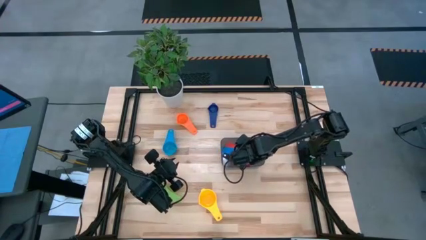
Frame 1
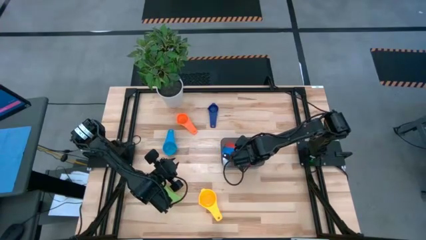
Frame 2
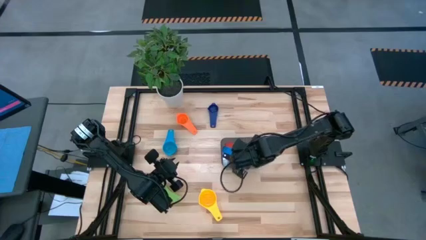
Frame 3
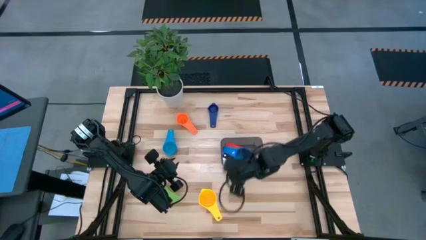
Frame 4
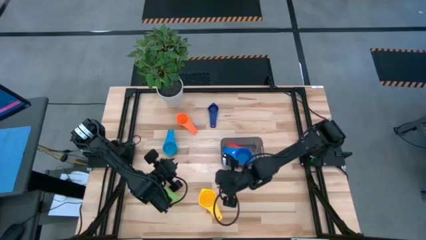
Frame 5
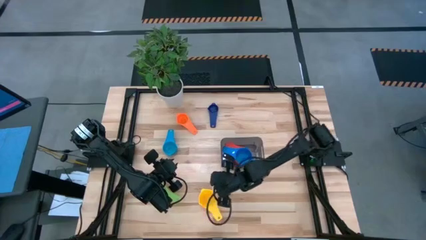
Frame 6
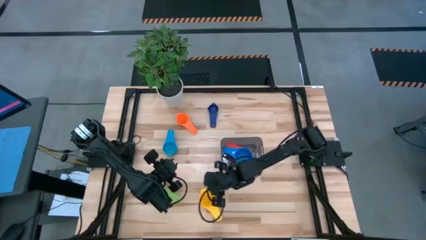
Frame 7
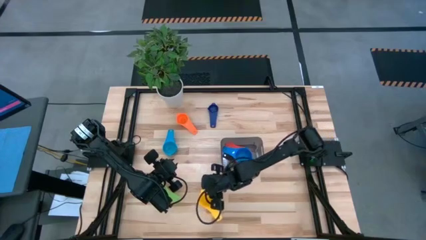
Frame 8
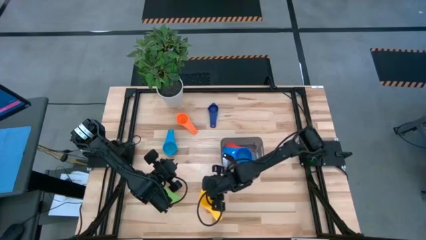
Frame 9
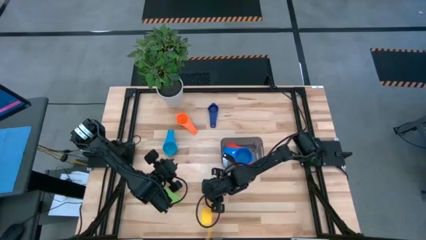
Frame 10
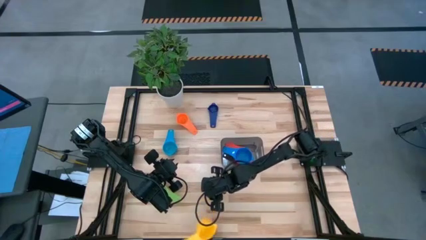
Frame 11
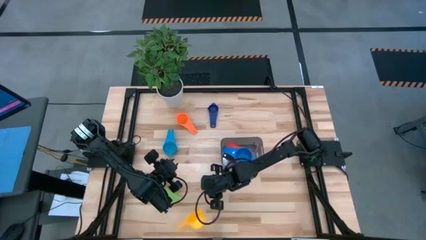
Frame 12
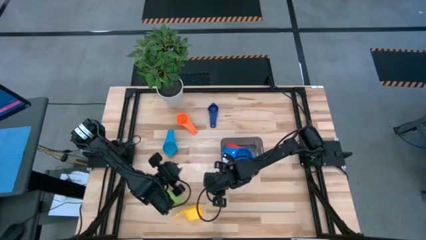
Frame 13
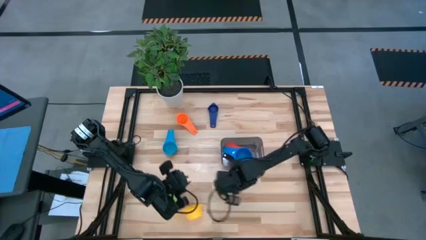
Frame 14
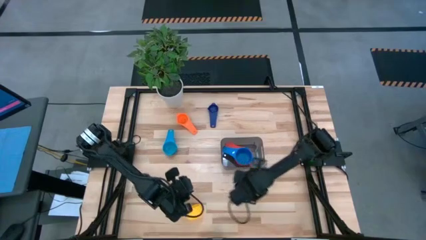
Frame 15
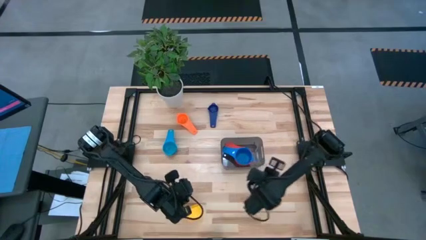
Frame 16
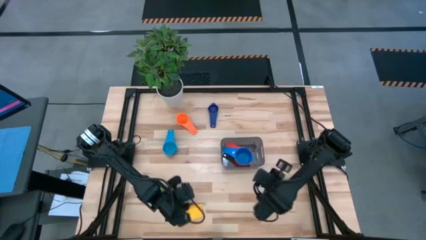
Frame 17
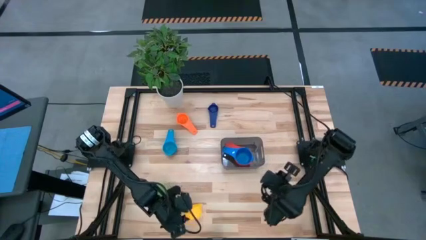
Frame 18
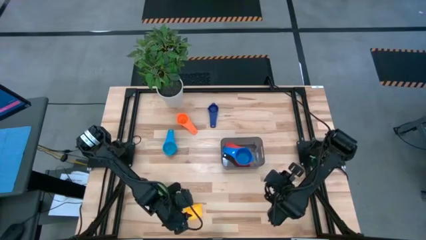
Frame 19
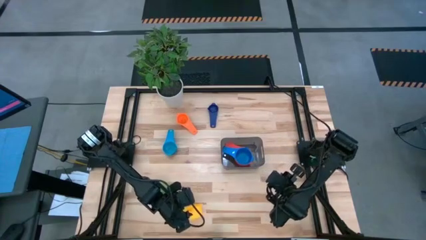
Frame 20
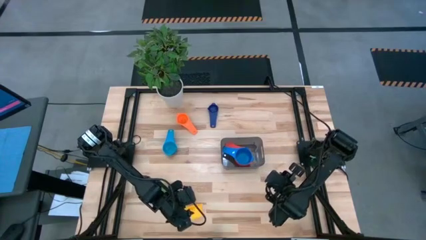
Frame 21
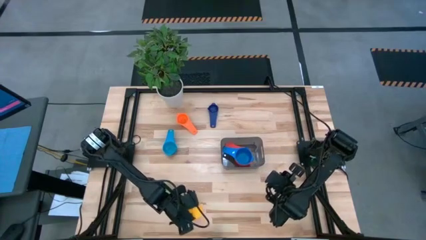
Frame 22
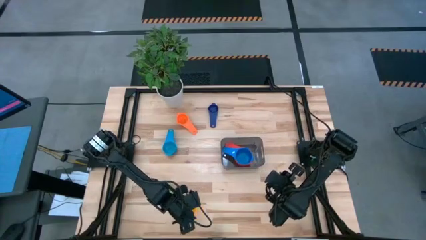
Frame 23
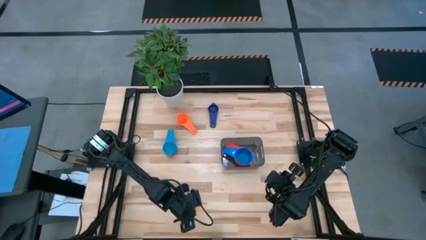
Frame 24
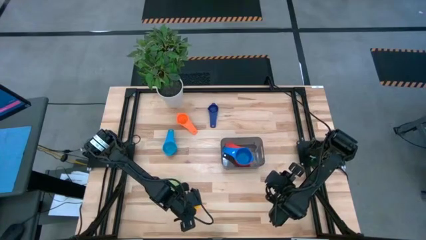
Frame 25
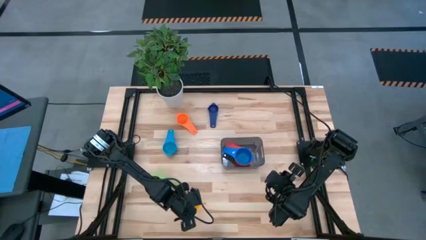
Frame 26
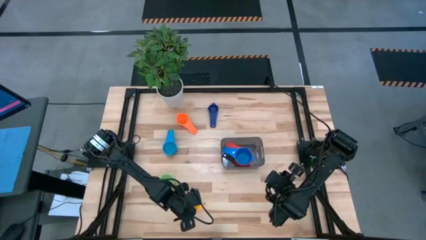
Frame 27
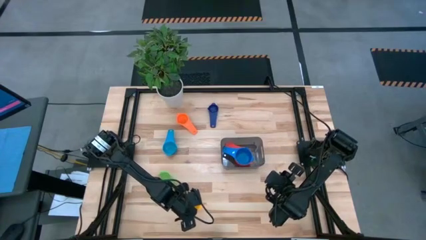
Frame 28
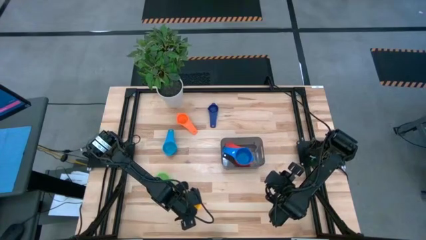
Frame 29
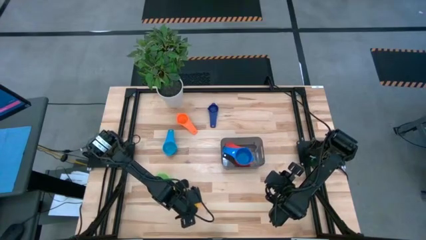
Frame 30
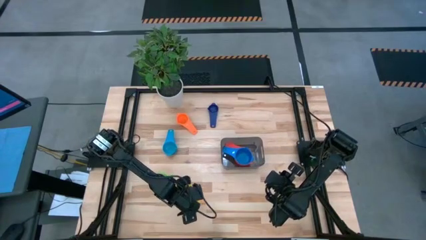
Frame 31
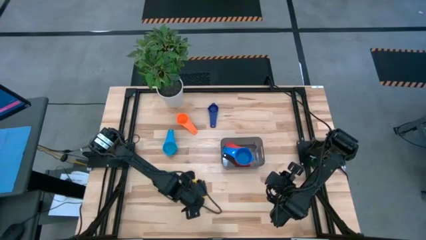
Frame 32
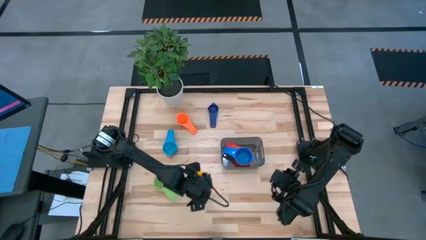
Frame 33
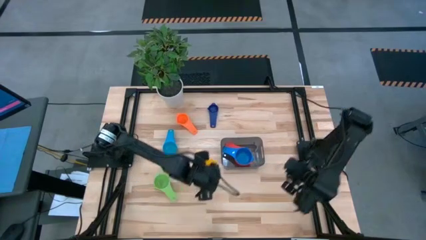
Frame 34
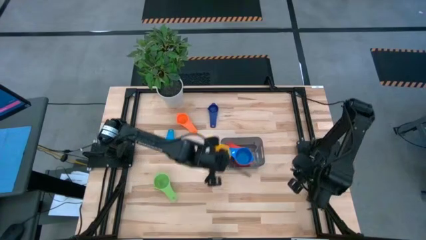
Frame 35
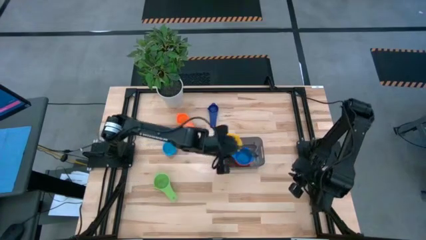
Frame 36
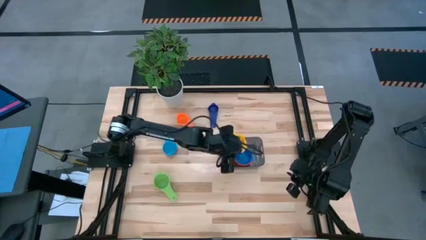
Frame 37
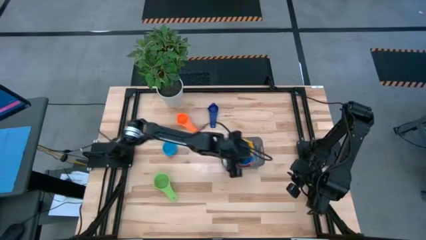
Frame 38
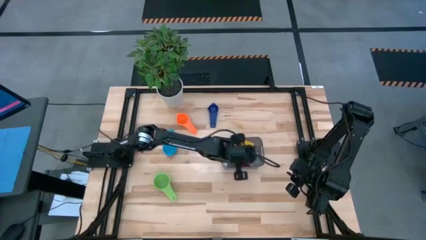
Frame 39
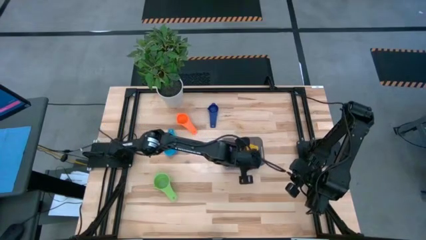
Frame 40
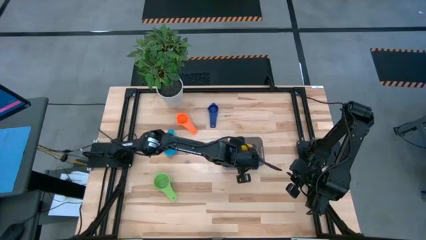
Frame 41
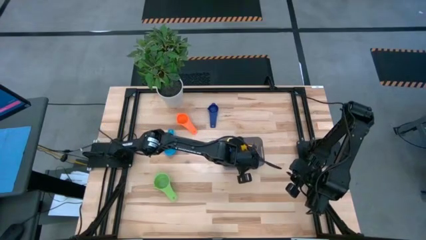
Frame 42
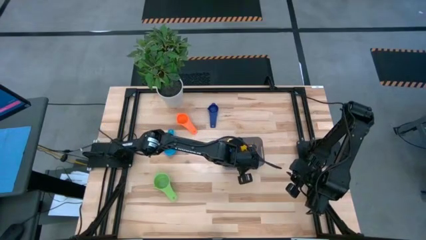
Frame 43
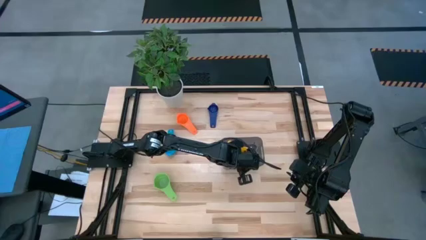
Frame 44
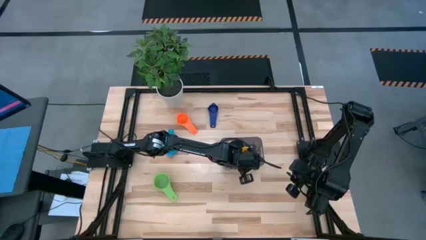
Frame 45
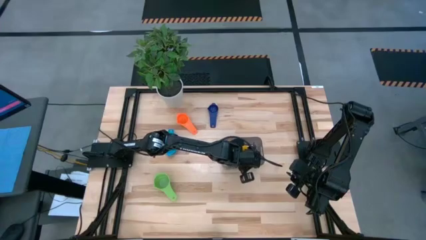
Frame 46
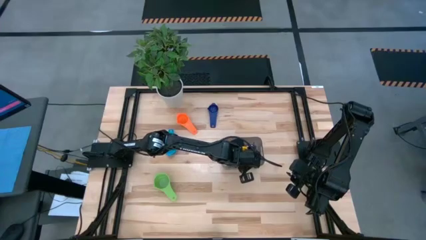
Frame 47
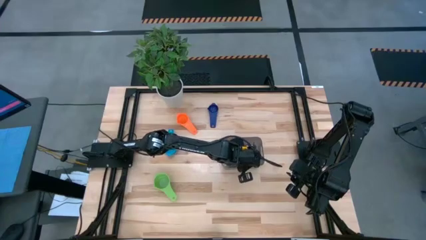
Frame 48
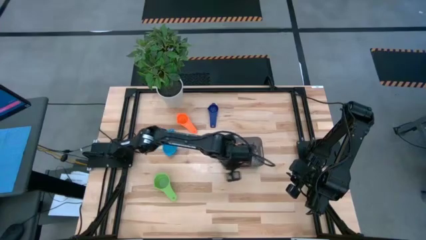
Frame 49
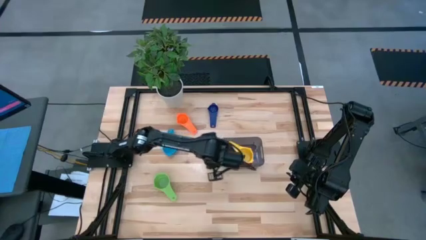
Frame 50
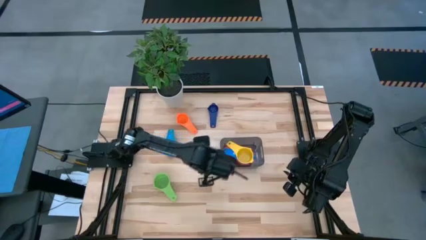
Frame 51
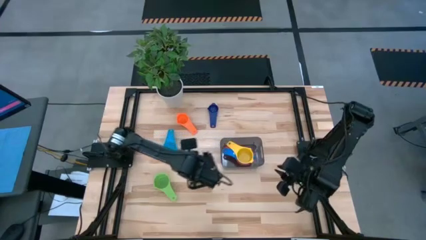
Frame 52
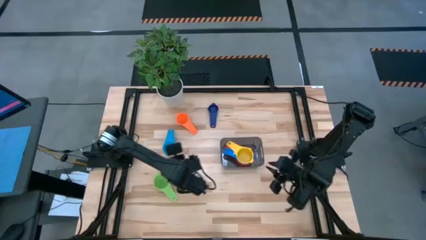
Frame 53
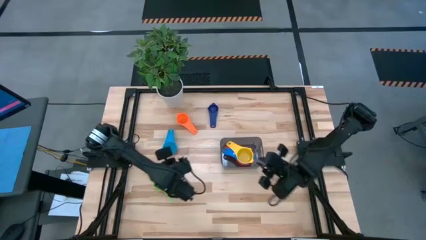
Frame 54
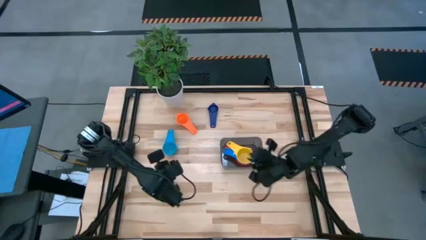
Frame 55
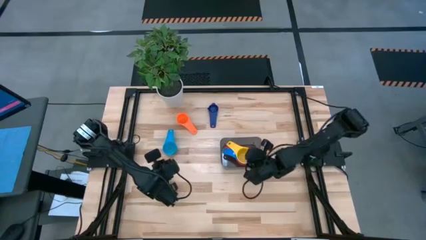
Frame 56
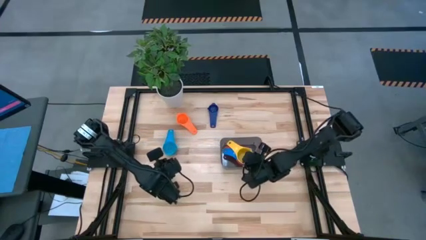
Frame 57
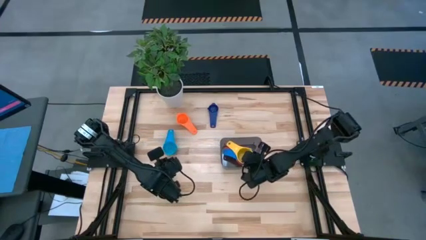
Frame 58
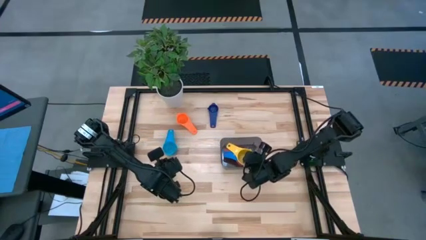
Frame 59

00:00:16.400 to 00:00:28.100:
Task: Nest measuring cups in basket
Stack the yellow measuring cup on top of the blue measuring cup in the black bin
